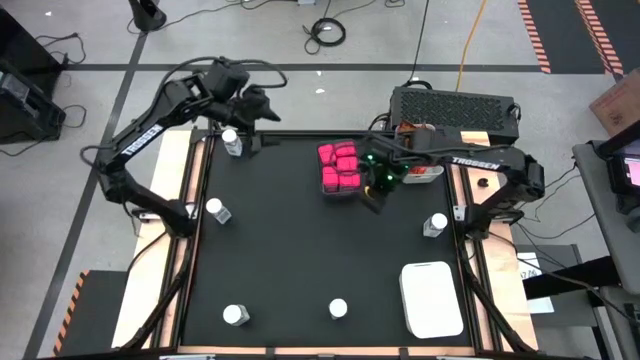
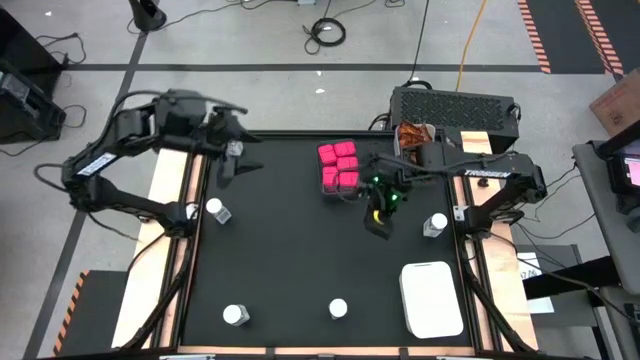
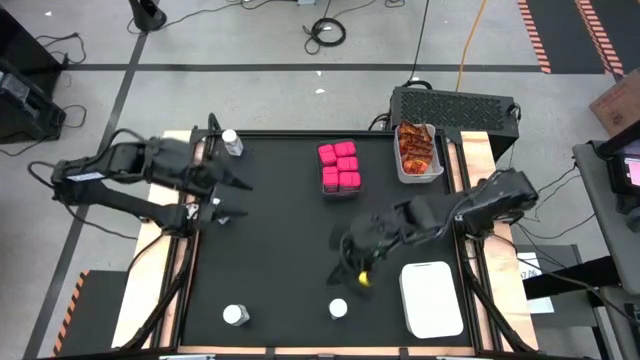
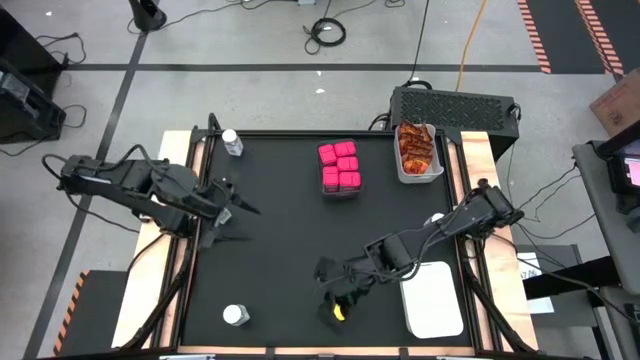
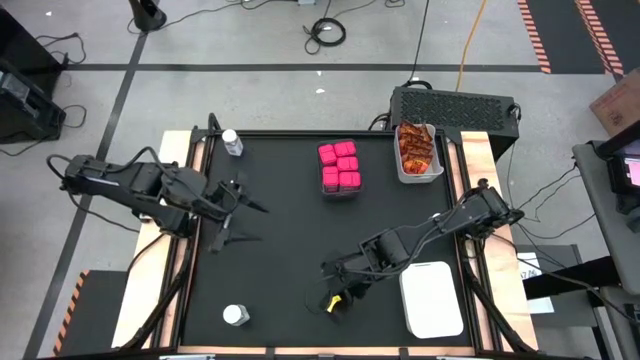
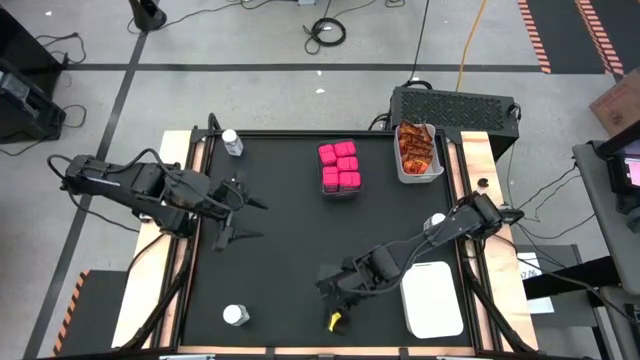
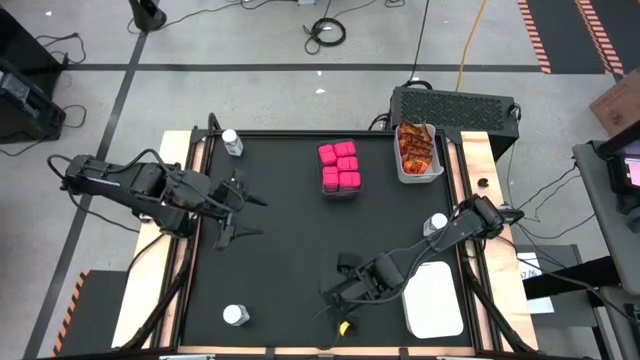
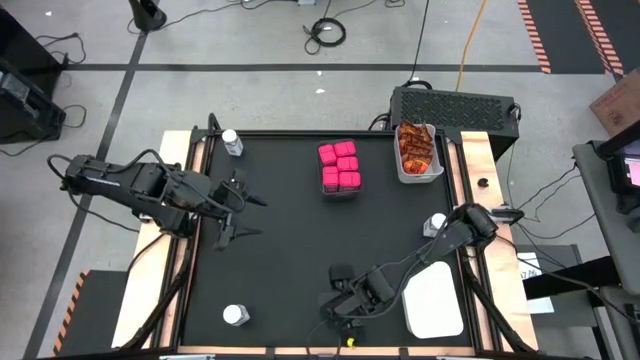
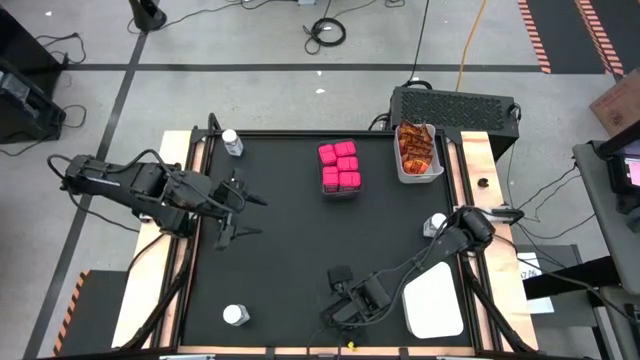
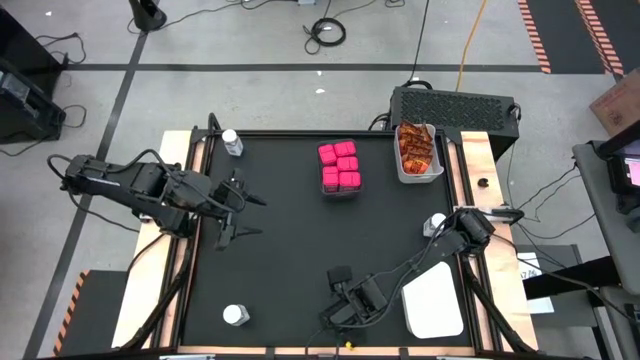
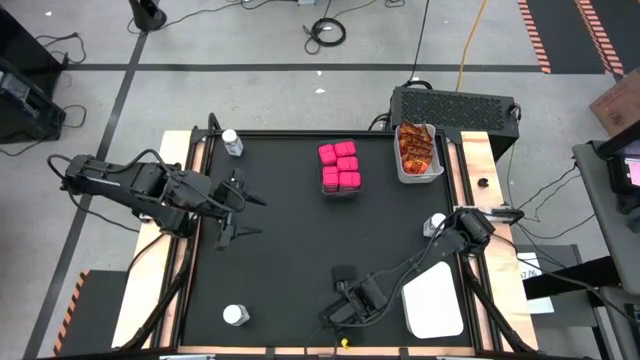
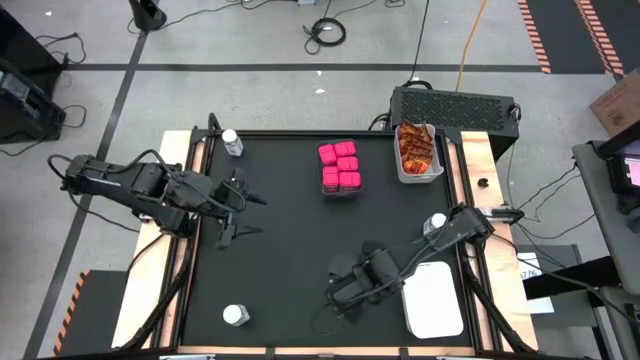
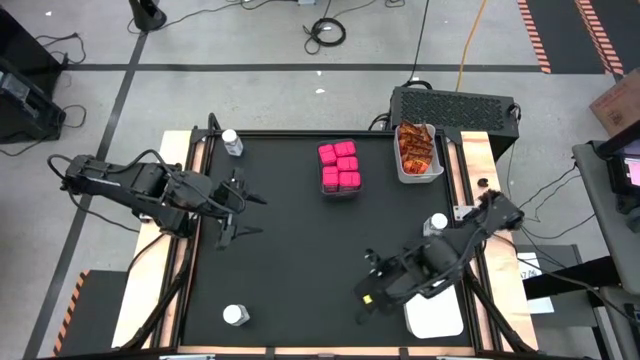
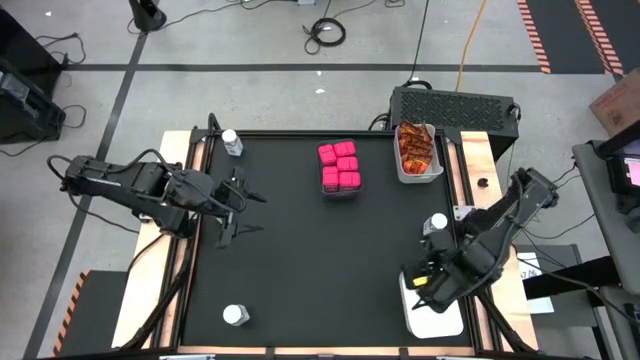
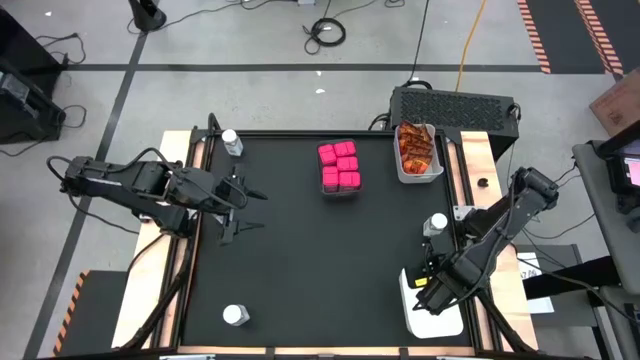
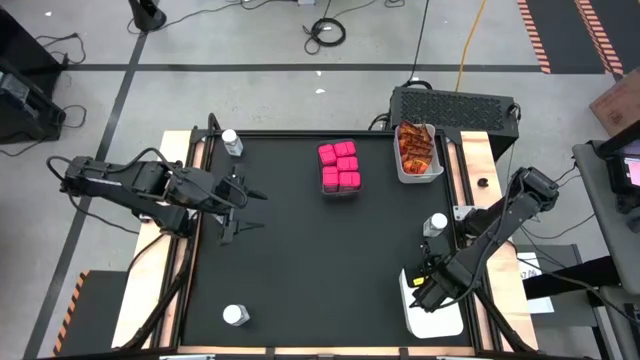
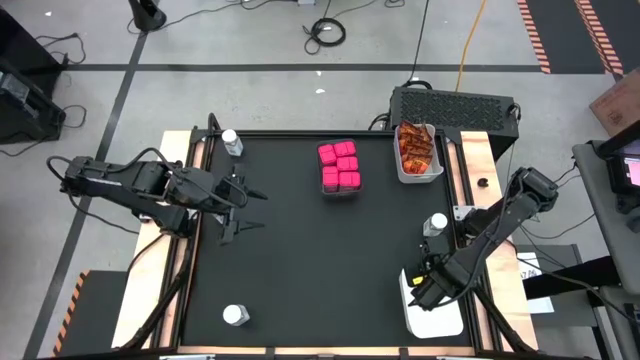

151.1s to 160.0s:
Task: Sort spices by type
Put the white seasoning bottle into the bottom white bin

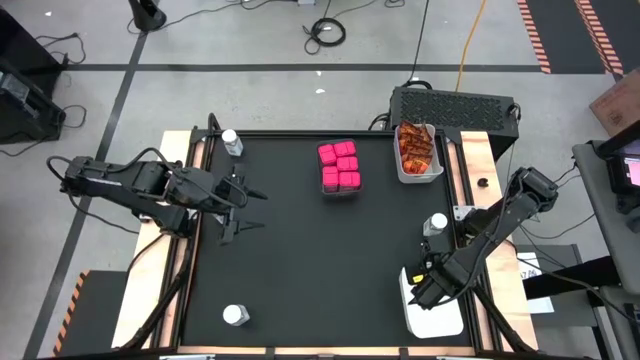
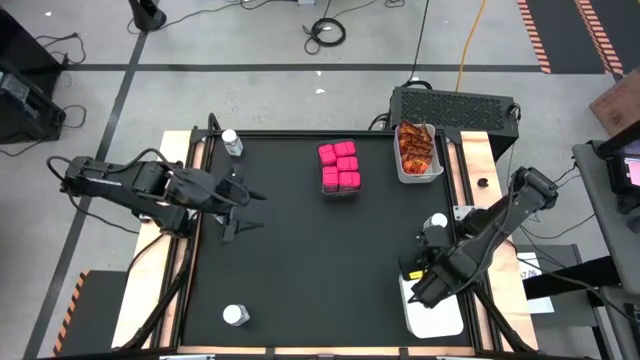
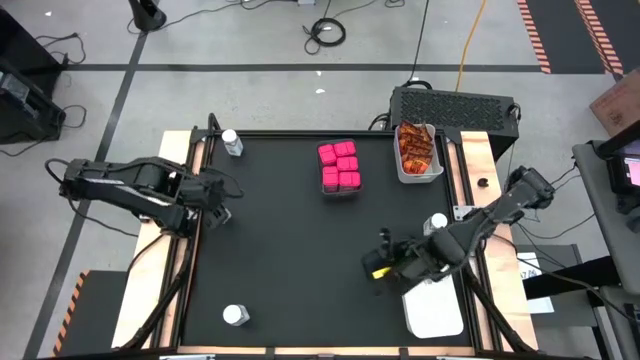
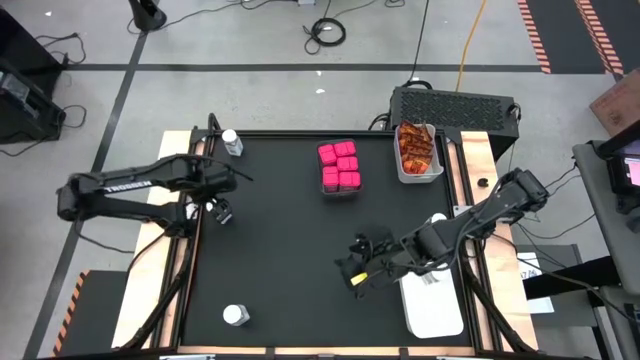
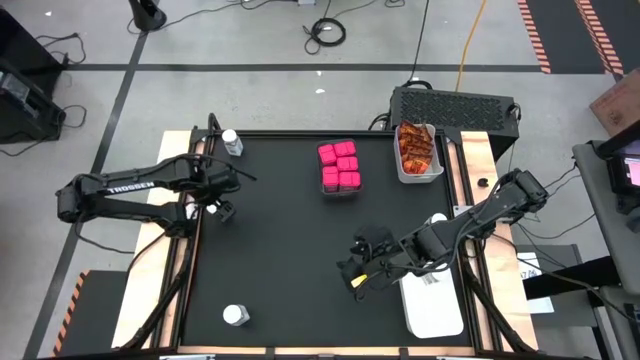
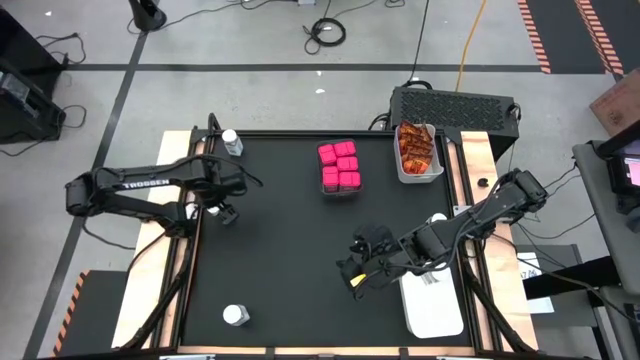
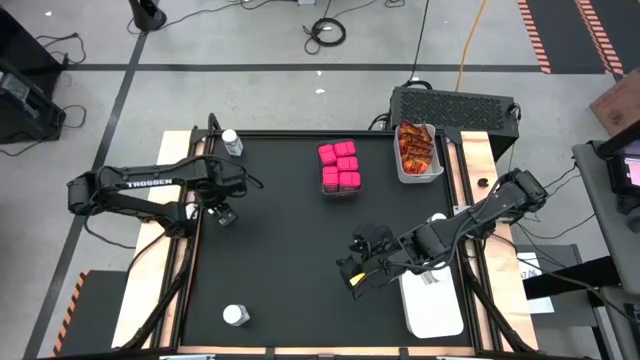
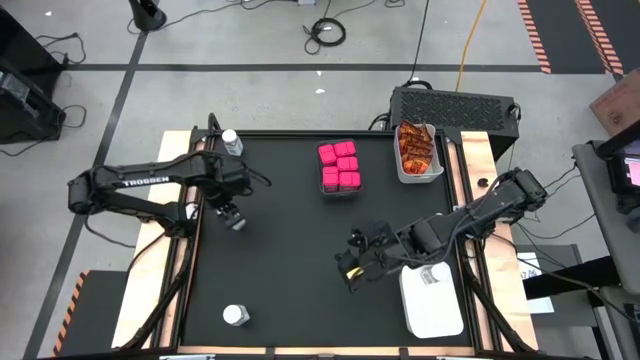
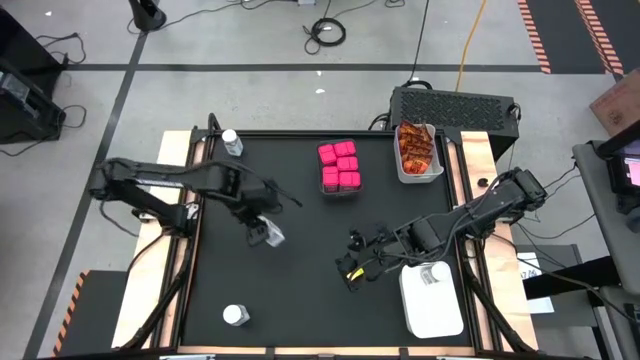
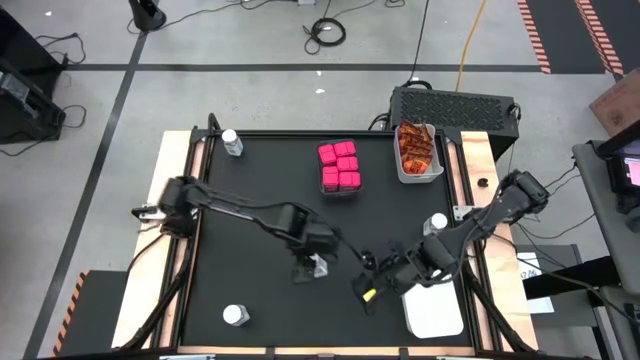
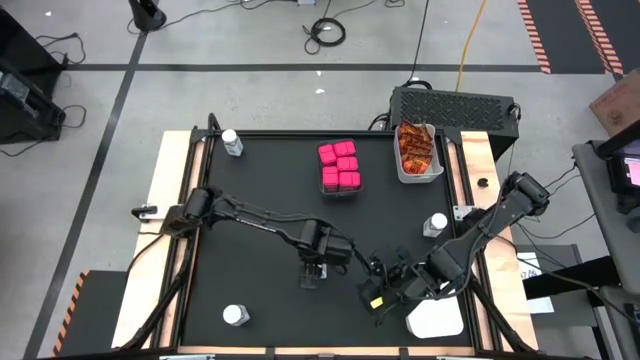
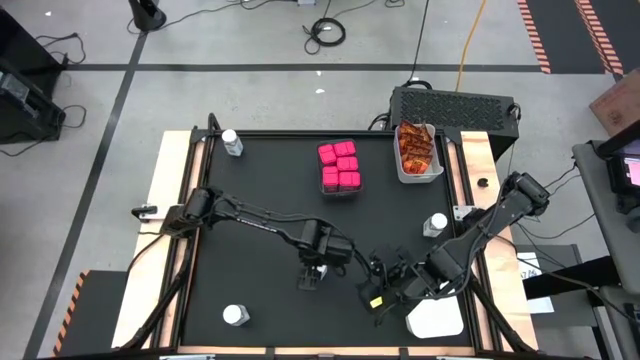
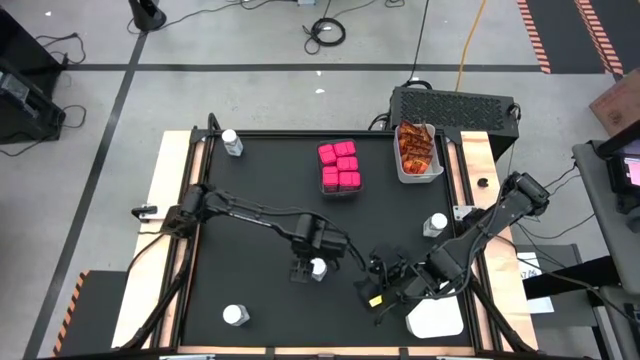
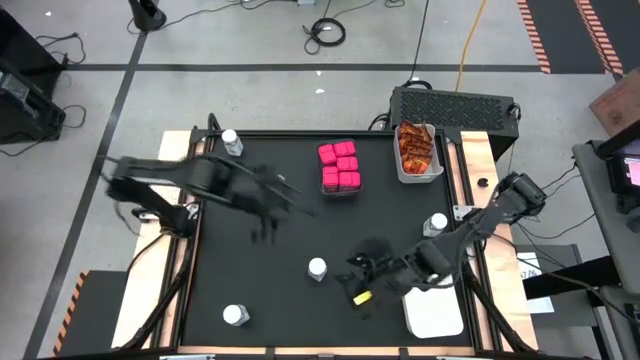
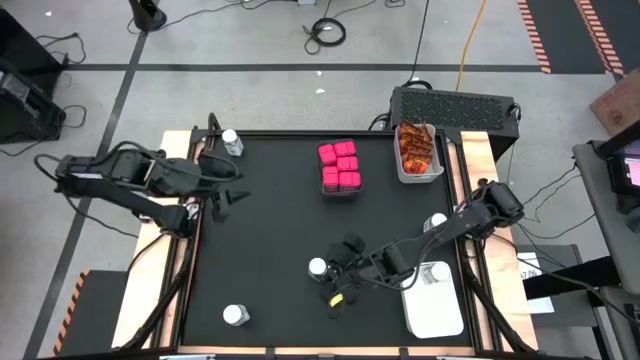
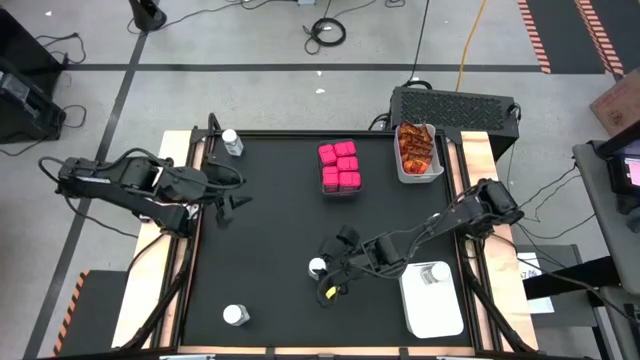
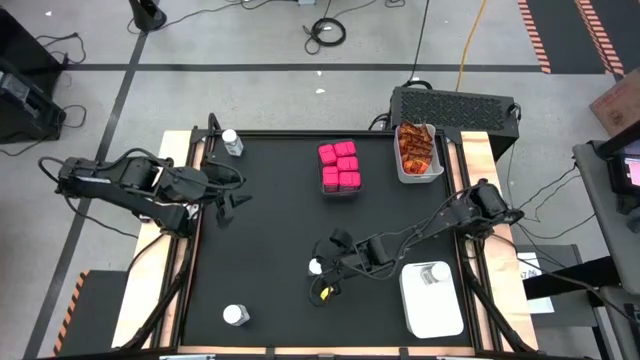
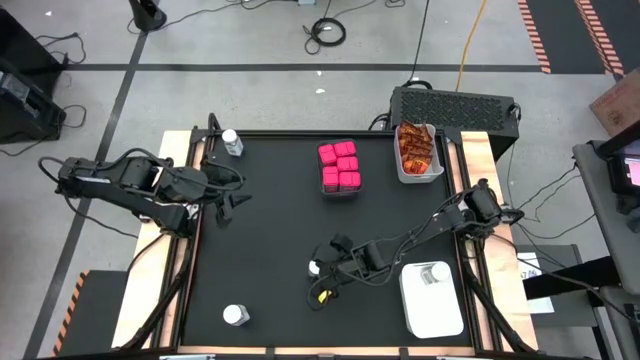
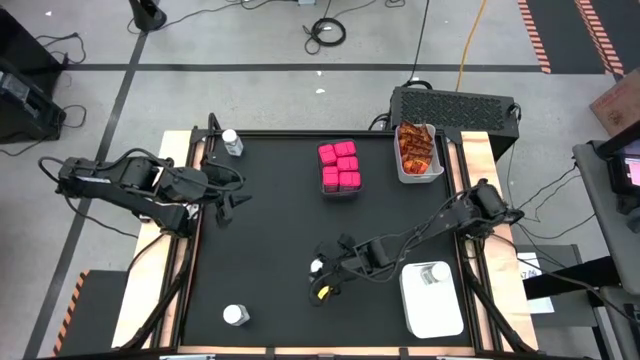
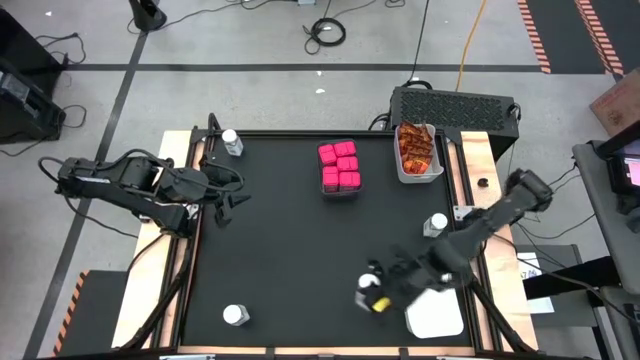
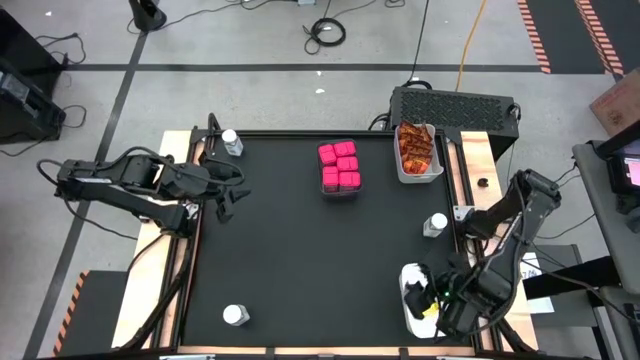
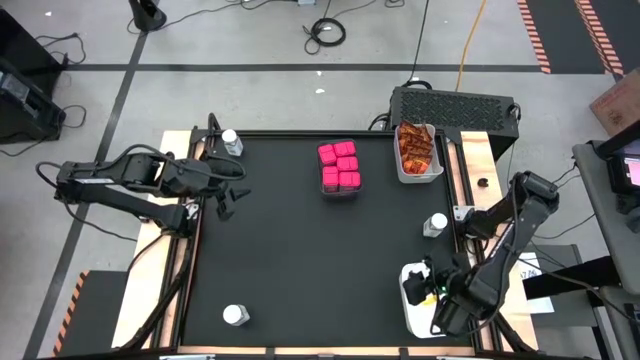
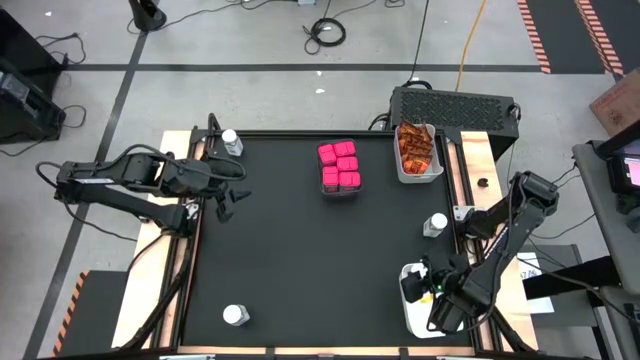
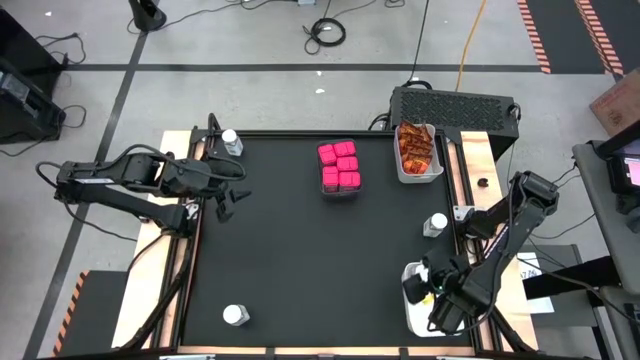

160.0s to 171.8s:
Put the white seasoning bottle into the bottom white bin

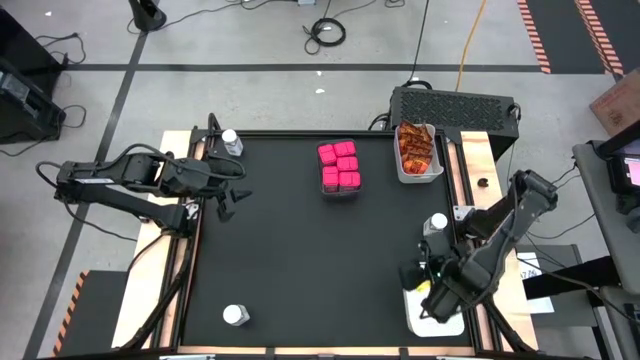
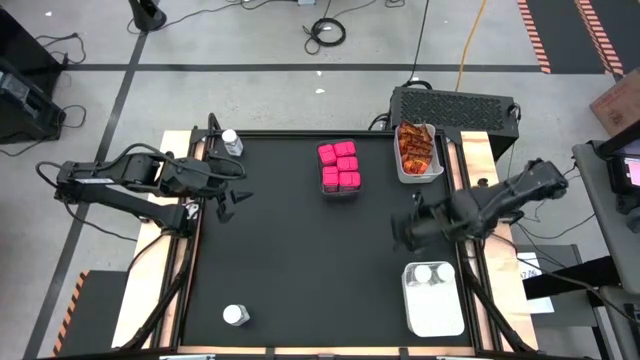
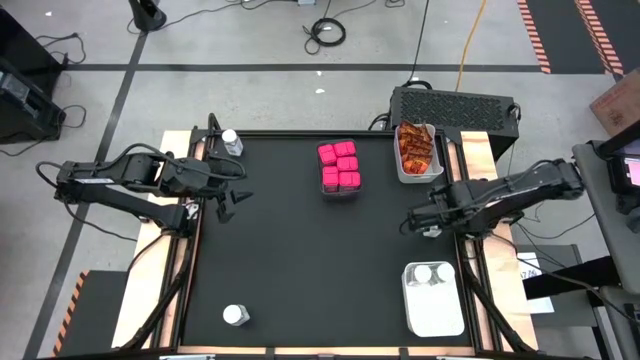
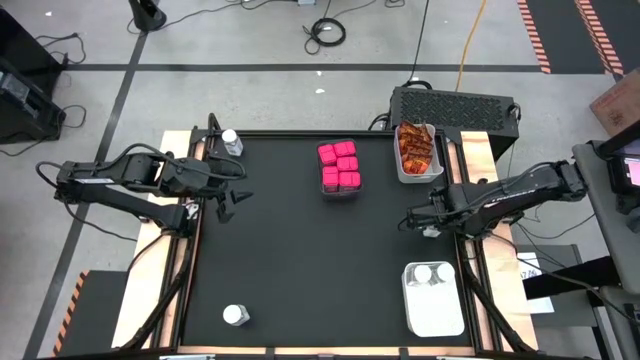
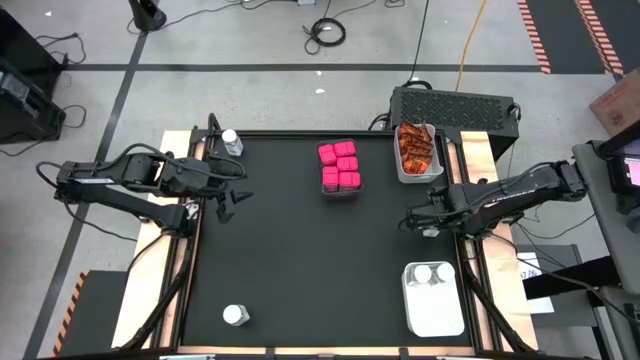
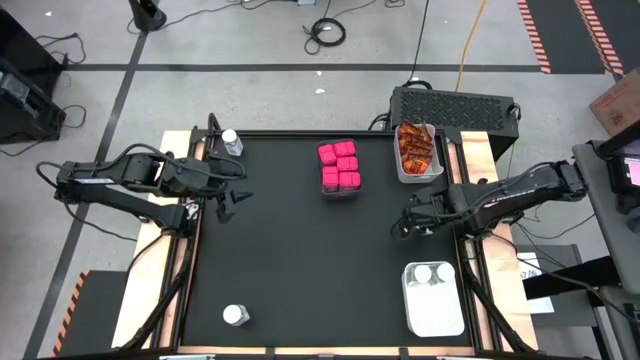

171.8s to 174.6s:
Put the white seasoning bottle into the bottom white bin
